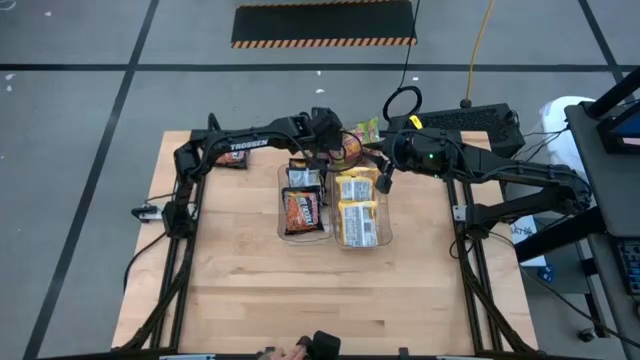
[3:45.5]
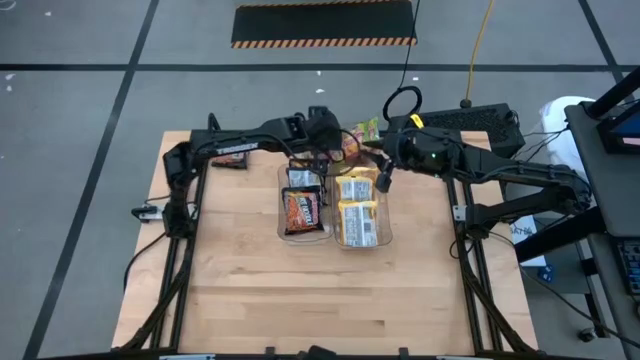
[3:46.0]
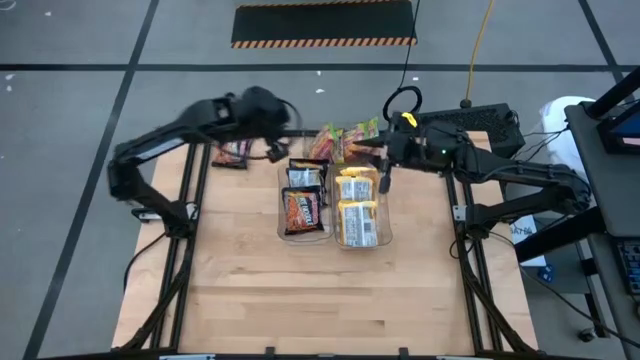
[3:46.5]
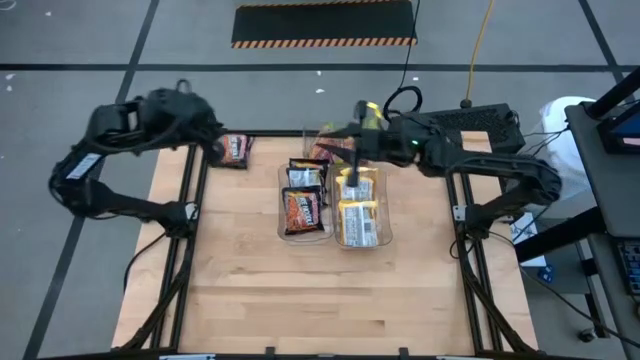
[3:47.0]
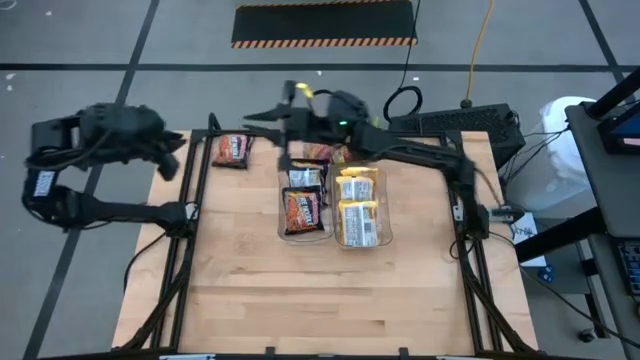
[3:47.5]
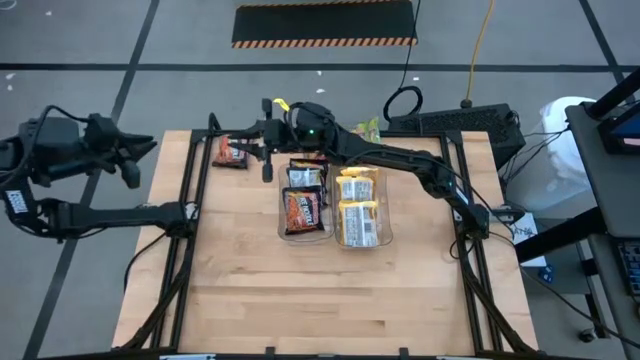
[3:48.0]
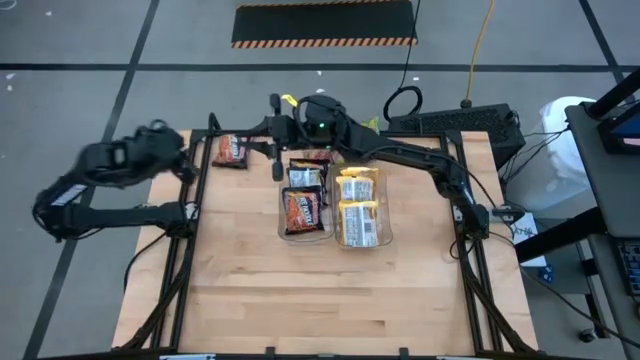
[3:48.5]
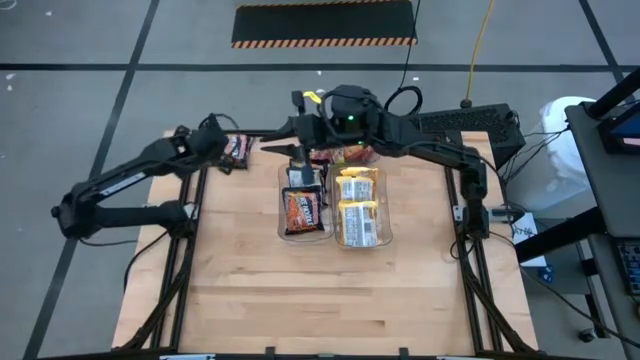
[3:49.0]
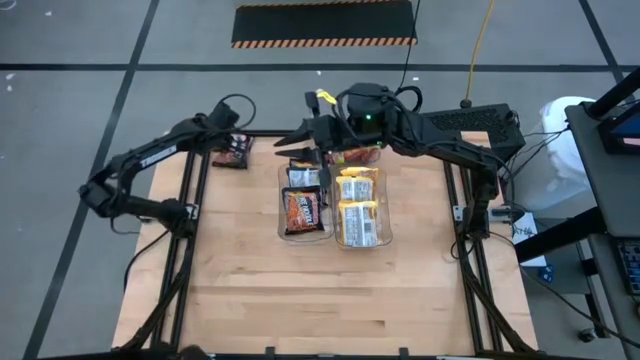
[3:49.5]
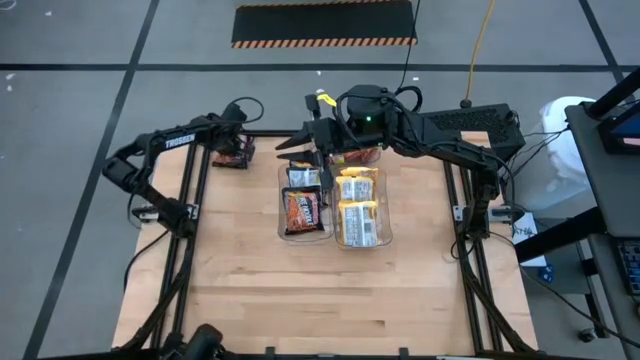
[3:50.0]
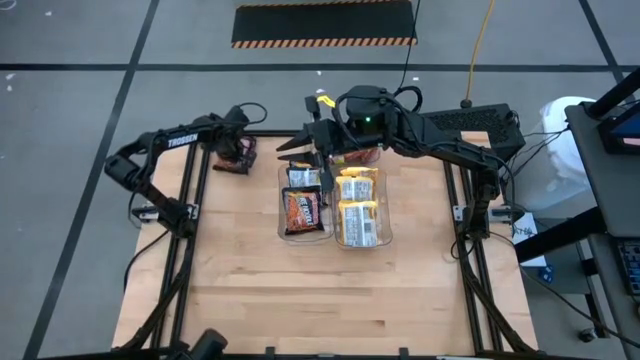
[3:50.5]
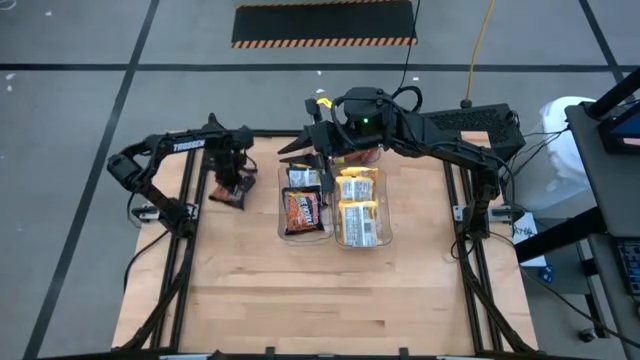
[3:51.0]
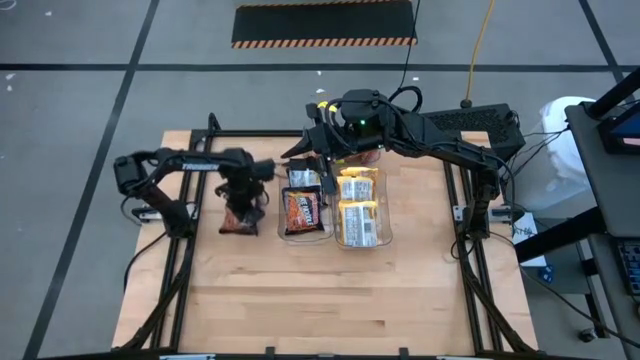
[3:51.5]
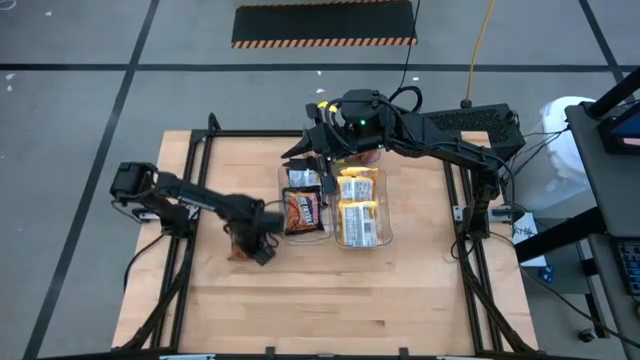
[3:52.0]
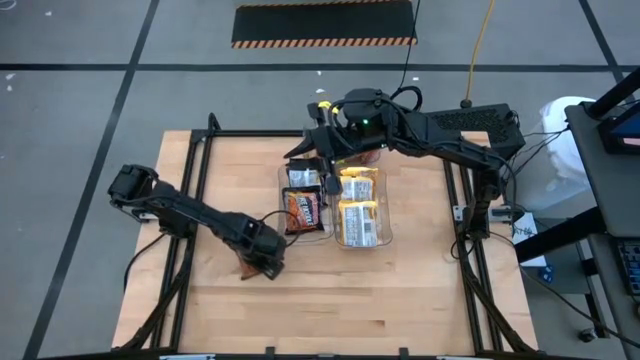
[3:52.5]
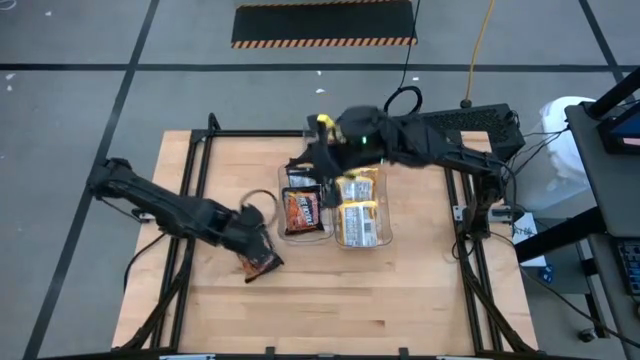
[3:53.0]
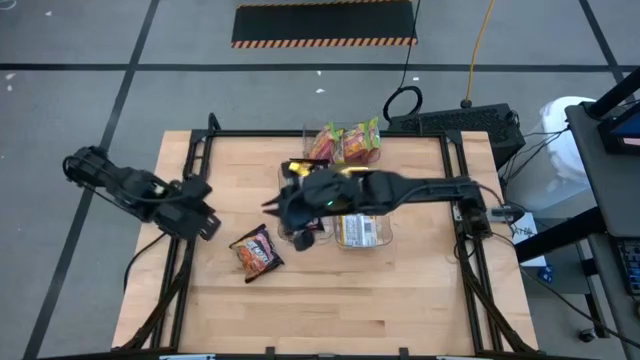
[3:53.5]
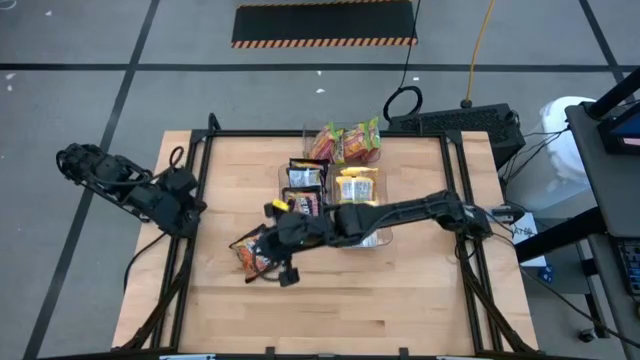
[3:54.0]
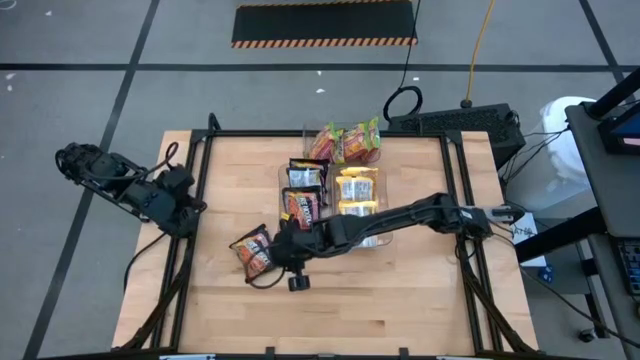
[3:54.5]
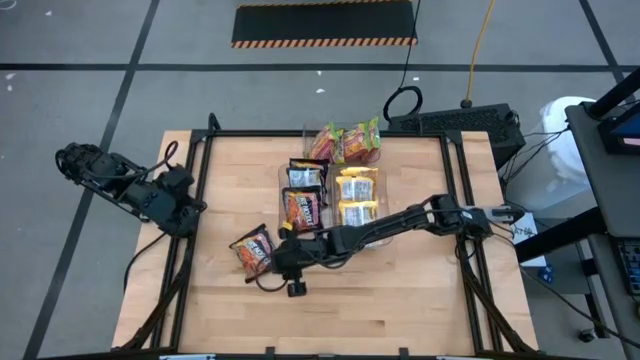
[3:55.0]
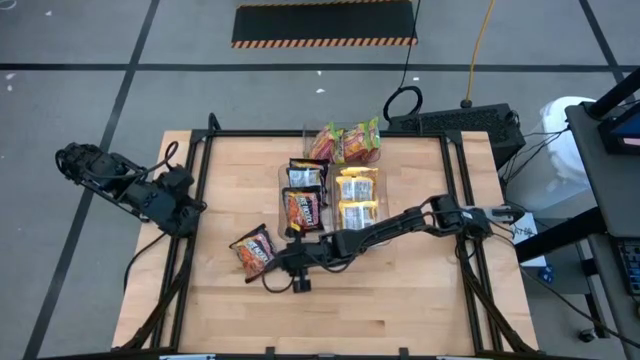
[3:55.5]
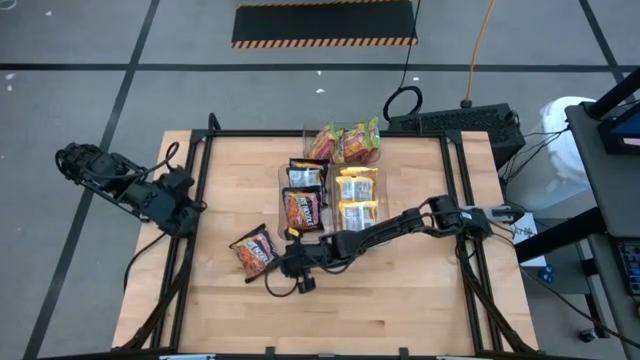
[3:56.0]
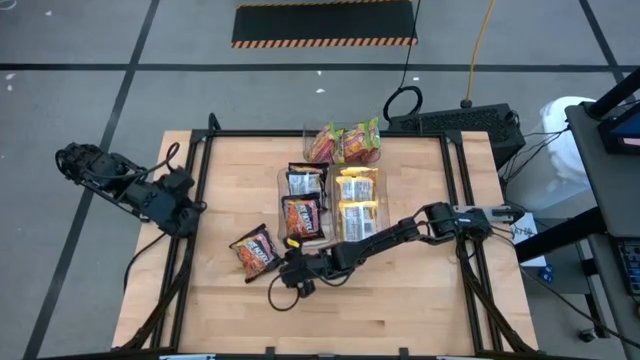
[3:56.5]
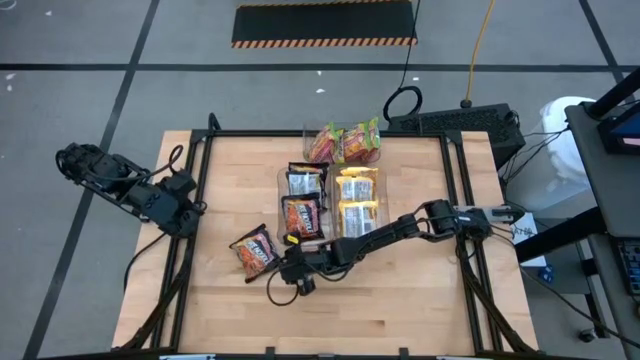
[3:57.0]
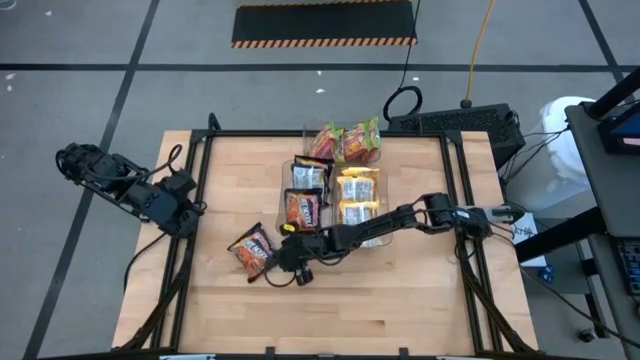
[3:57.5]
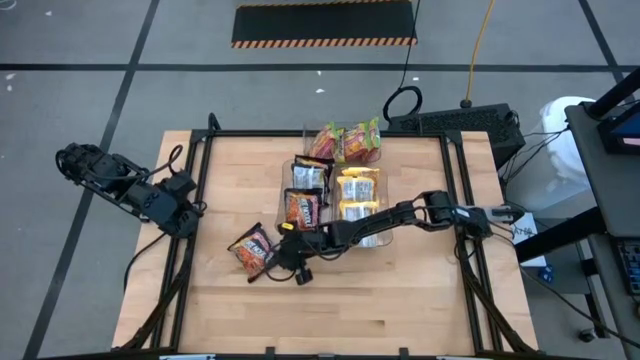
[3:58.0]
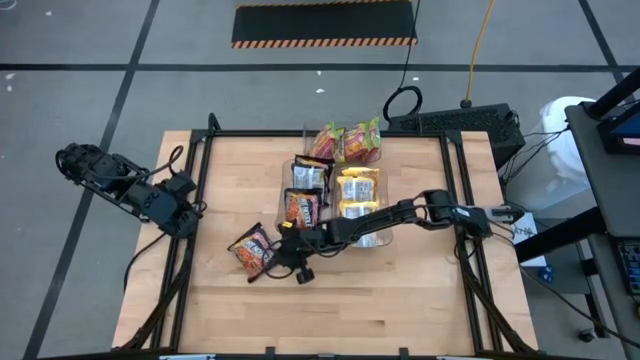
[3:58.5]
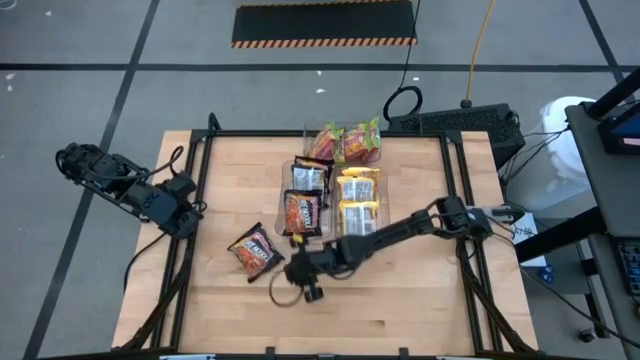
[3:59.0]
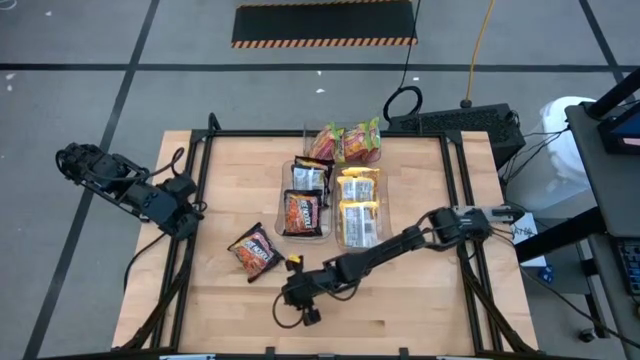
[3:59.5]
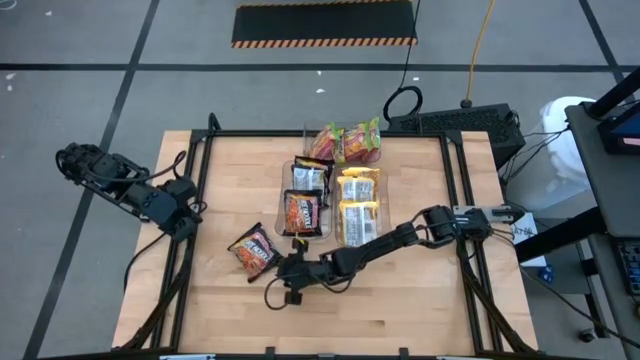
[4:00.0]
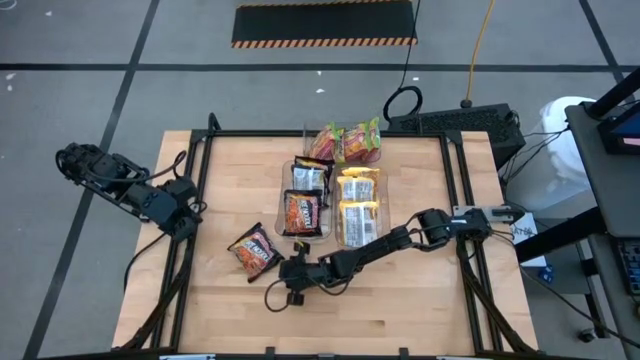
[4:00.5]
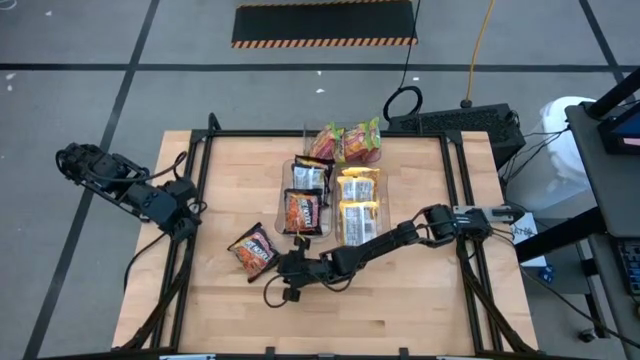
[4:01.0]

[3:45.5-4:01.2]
Task: Sort Maruchan noodles
Put the black noodle pack into the left transparent bin

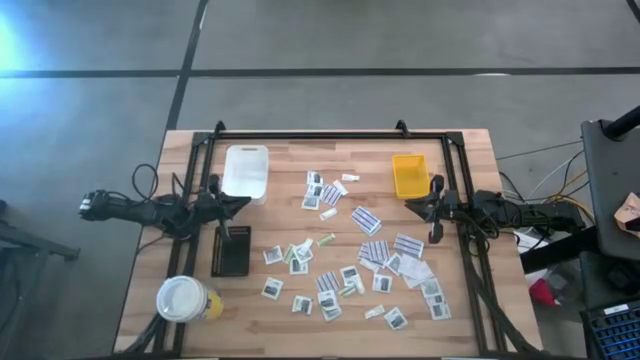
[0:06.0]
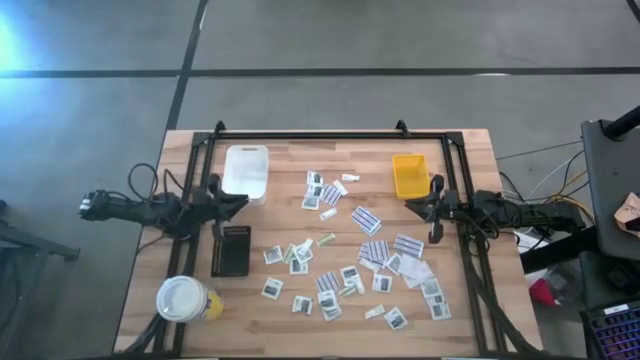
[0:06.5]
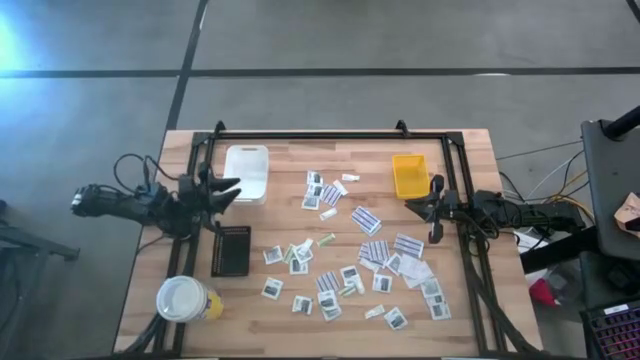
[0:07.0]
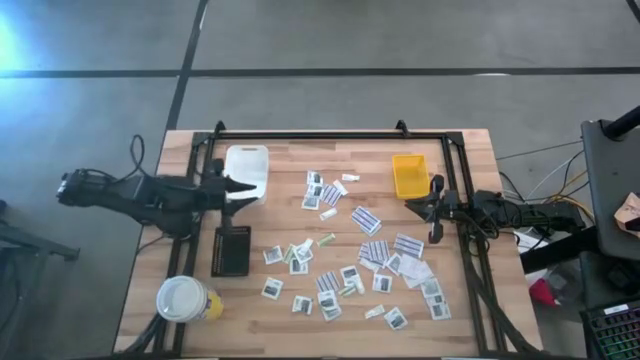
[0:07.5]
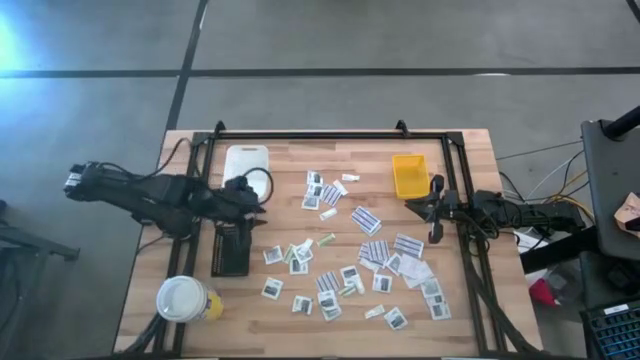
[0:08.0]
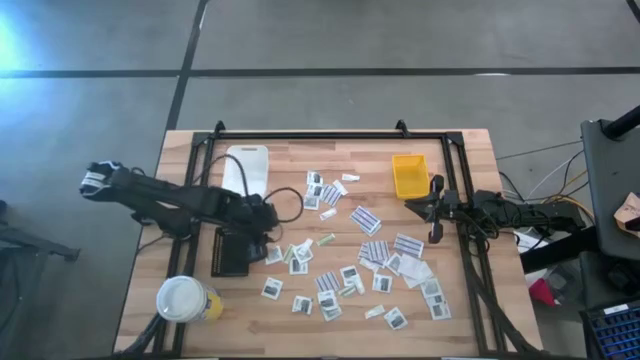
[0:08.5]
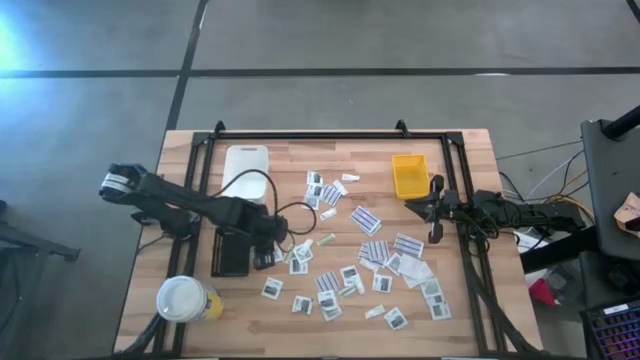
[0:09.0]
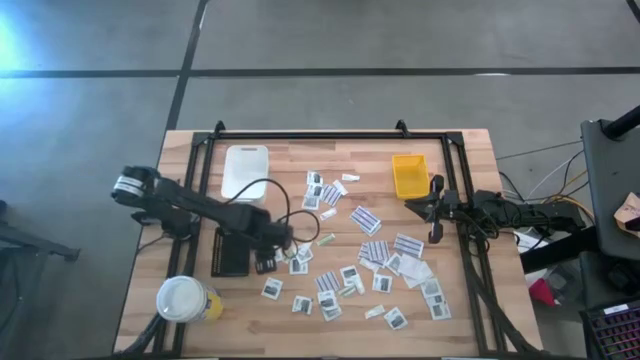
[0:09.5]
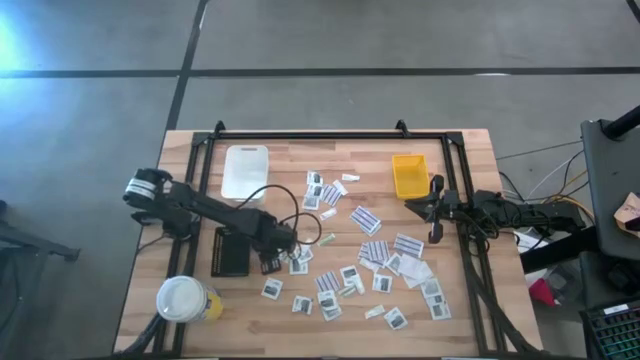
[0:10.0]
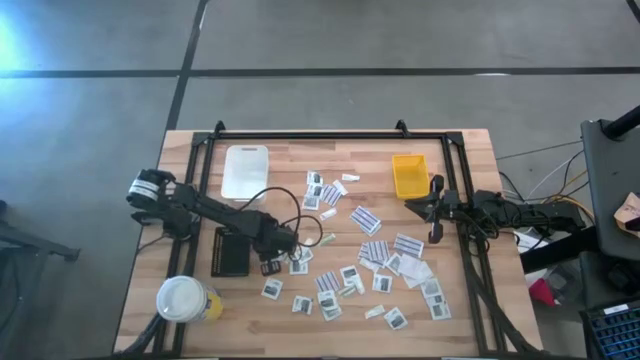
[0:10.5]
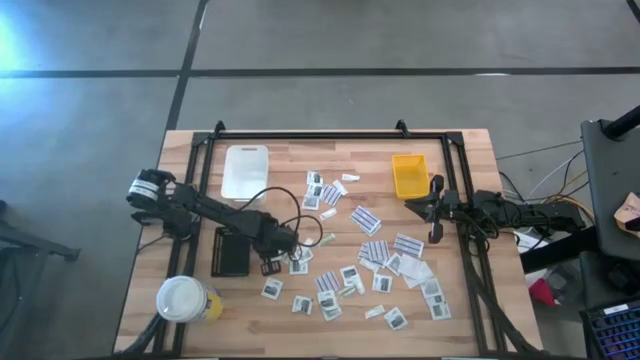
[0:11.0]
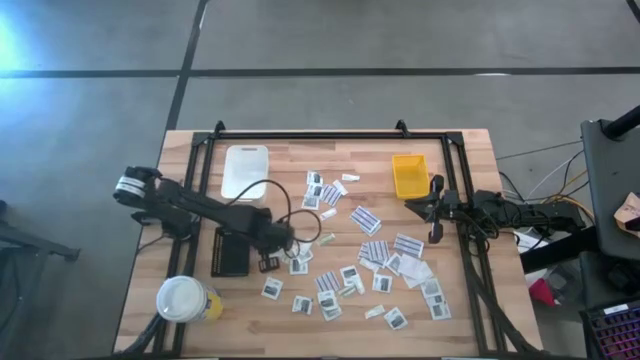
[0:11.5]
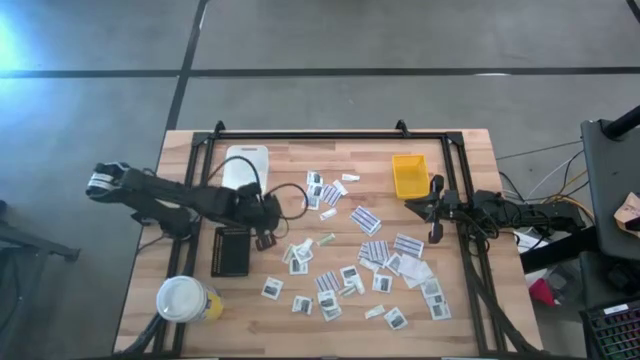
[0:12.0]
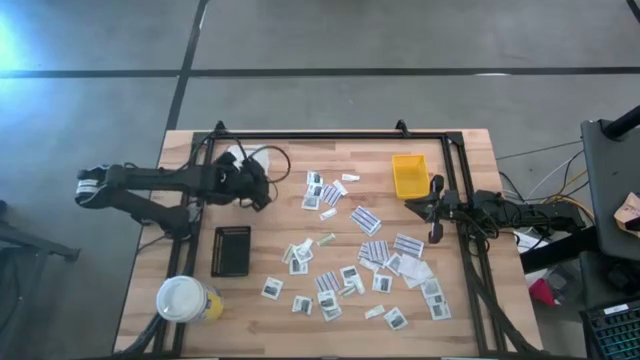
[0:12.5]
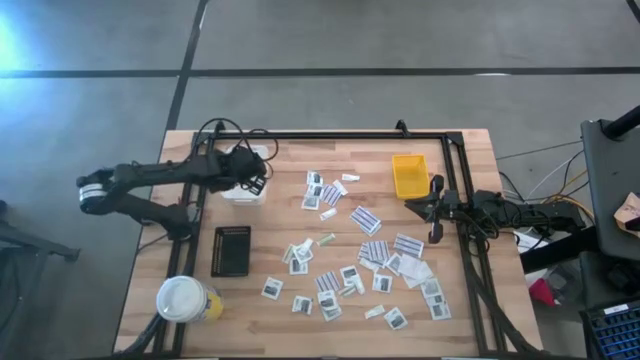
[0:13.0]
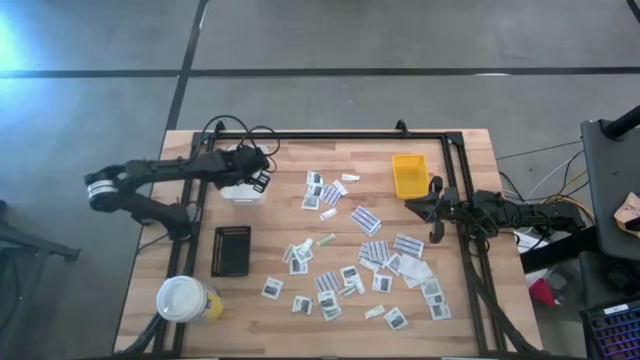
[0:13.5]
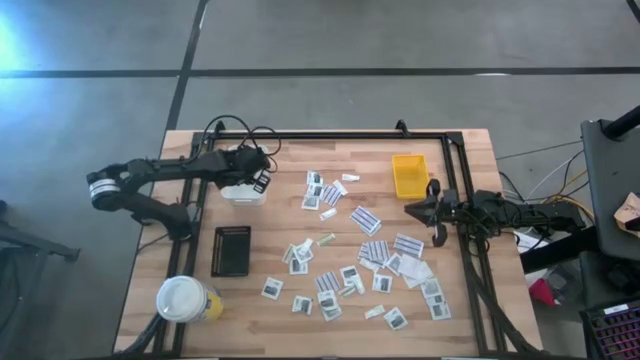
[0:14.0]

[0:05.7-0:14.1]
Task: Pick & Place First Aid Supplies
Put the gray towelette pack into the white bin
